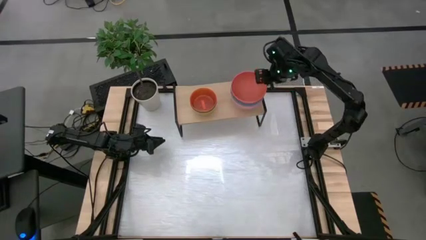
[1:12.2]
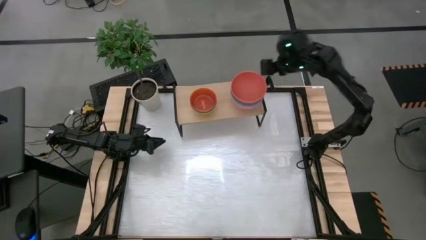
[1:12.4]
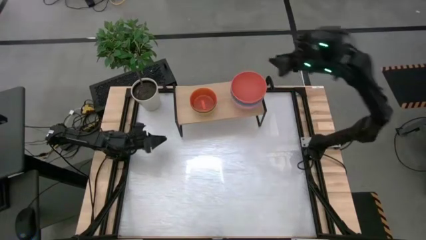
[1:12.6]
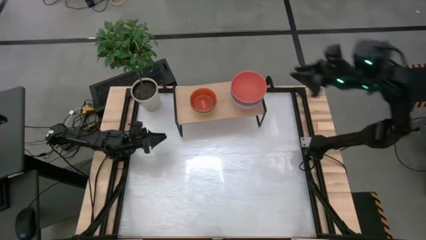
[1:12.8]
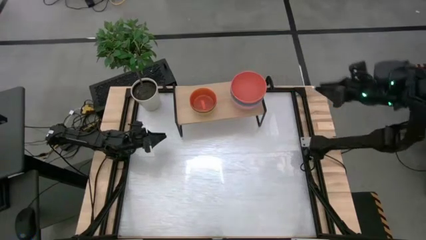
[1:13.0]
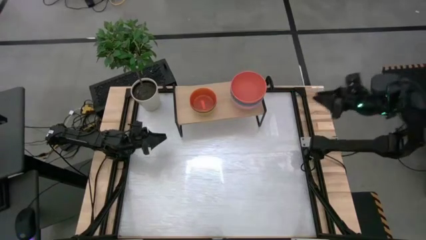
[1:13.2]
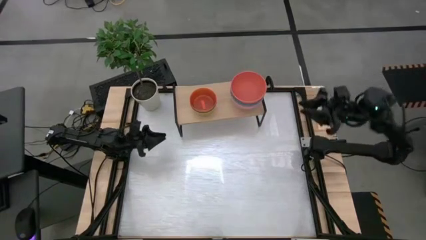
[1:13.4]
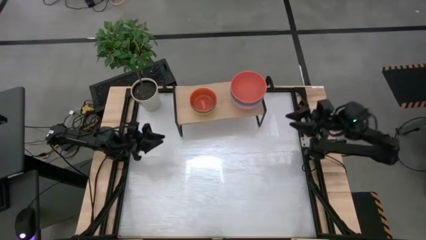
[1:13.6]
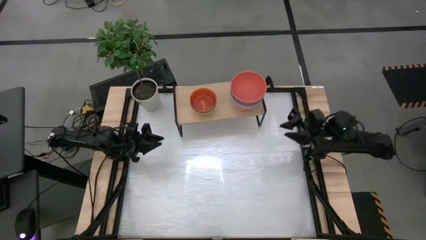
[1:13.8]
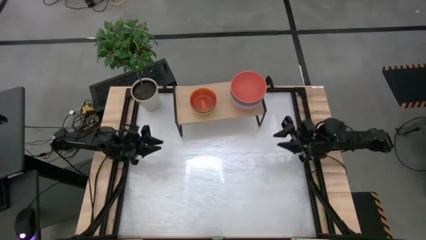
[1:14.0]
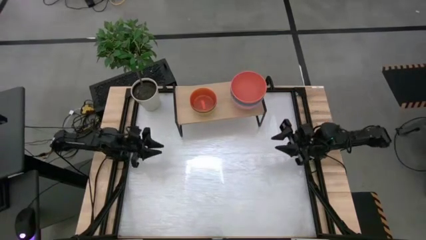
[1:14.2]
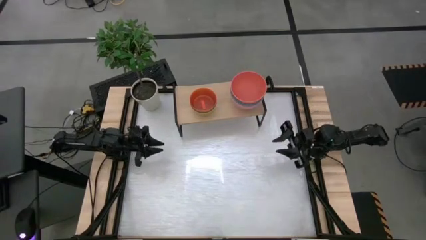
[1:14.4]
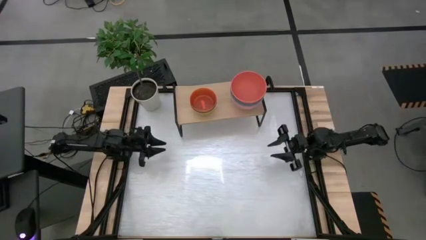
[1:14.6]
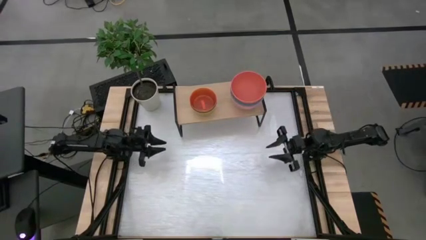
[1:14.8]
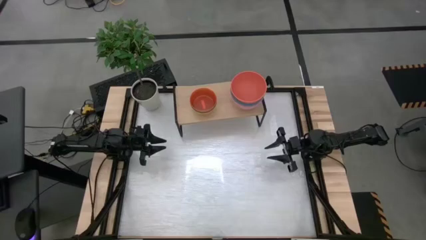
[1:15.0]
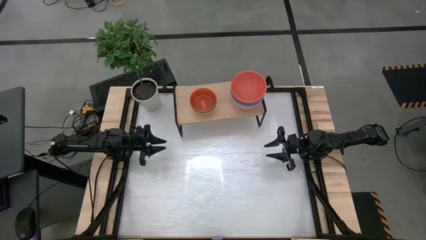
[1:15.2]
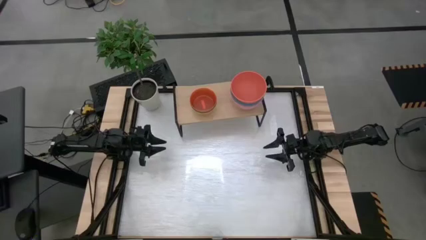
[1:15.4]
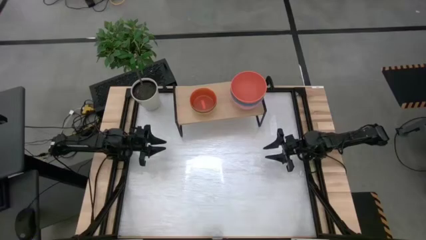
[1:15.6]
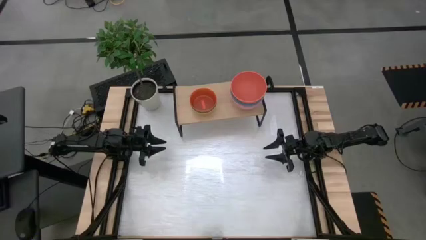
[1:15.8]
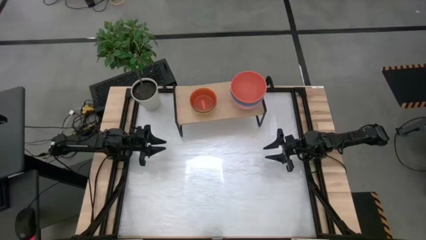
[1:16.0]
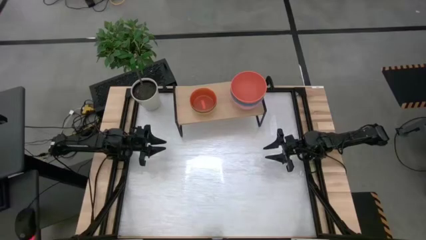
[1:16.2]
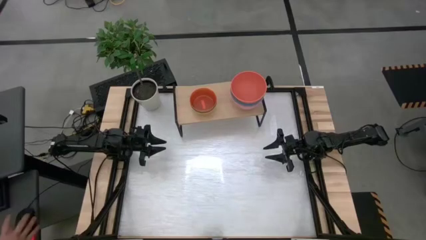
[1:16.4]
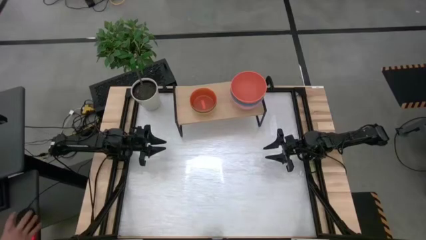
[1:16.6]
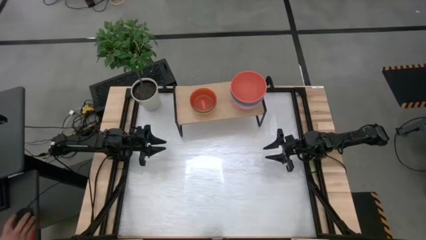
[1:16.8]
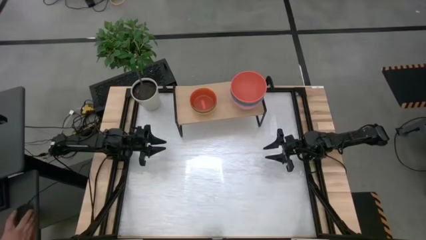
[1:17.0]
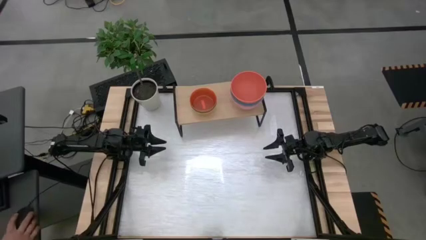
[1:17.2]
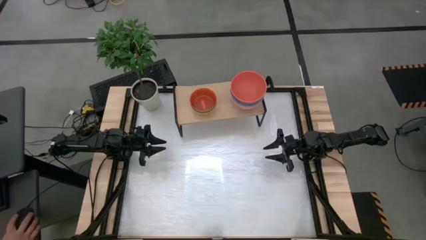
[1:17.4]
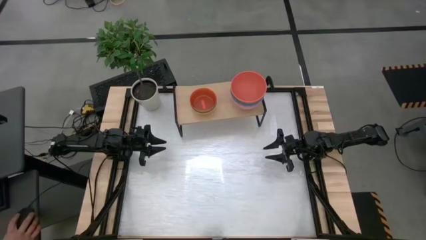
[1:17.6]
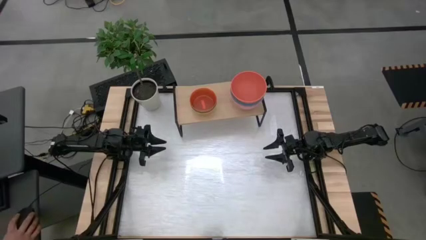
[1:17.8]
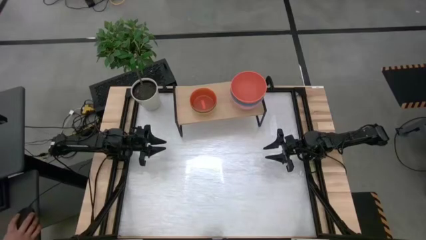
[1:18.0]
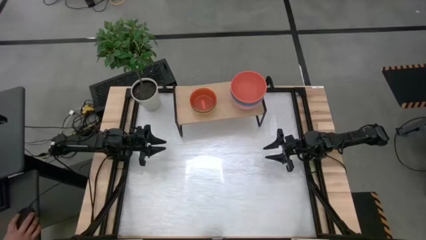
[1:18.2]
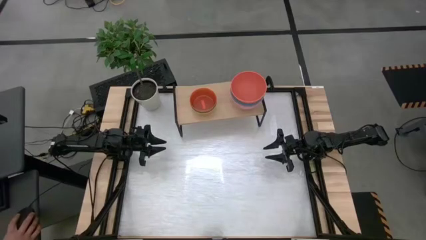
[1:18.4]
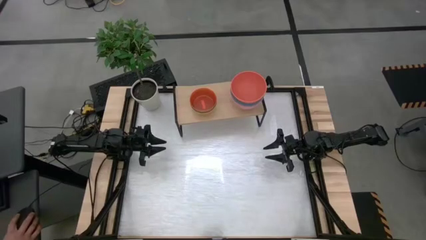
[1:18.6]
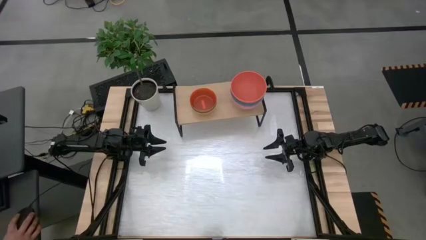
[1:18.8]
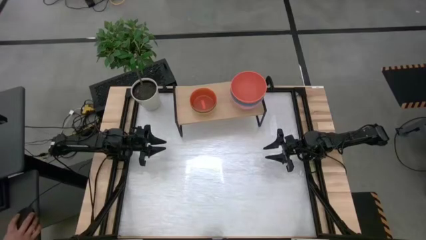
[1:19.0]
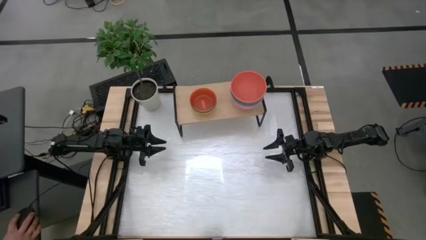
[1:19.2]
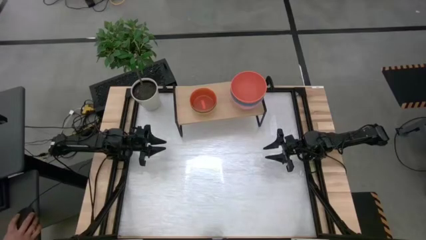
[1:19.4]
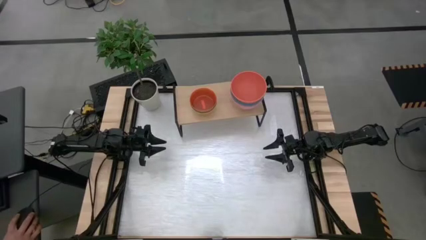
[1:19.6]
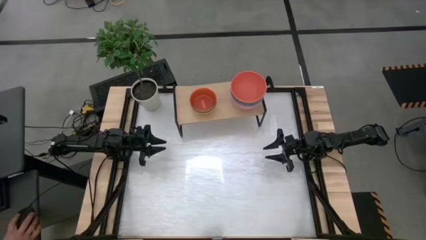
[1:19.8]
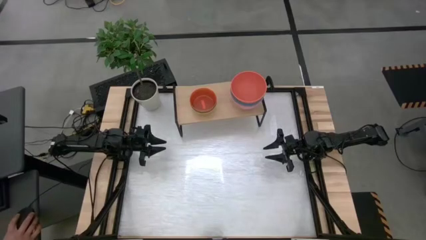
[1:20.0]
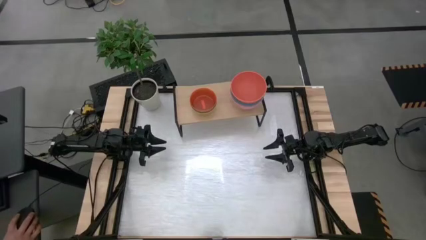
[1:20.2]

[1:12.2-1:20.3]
Task: Place and stack bowls onto a shelf
Return to Home Position

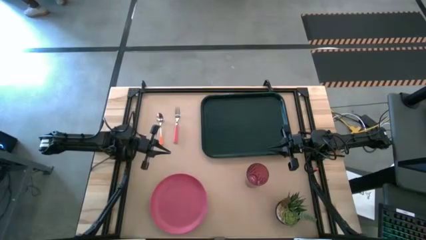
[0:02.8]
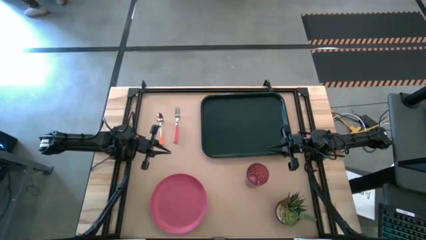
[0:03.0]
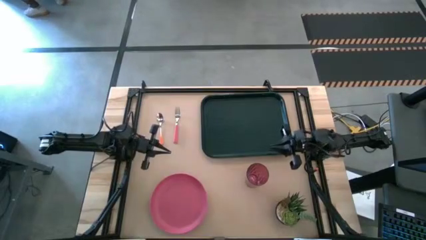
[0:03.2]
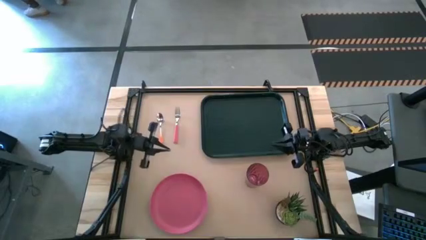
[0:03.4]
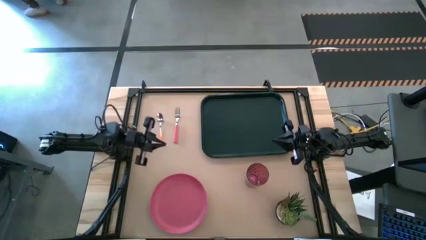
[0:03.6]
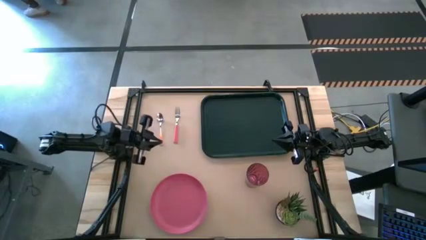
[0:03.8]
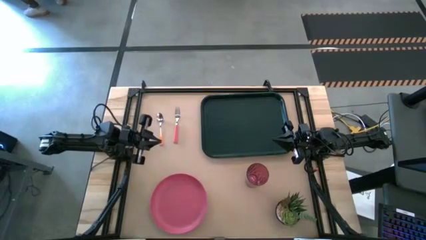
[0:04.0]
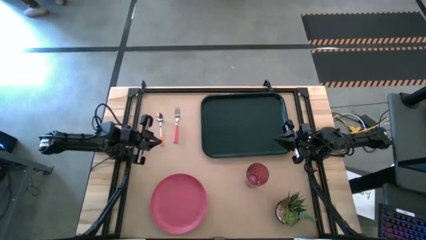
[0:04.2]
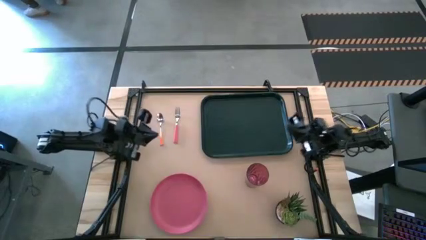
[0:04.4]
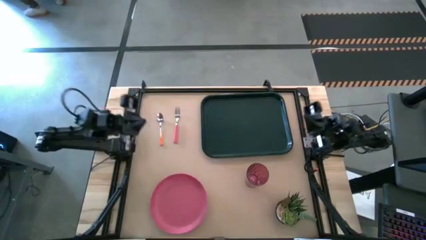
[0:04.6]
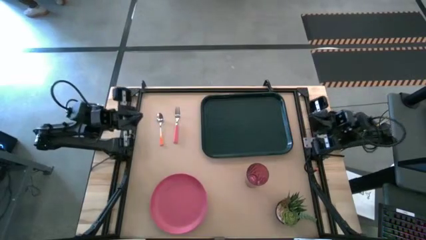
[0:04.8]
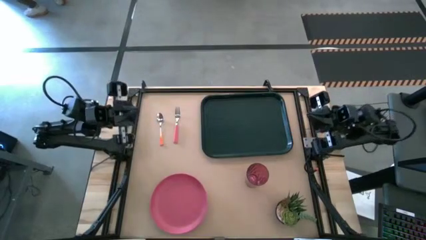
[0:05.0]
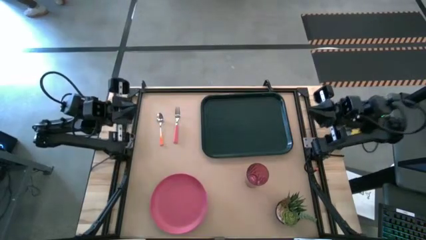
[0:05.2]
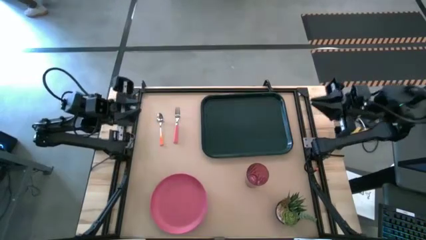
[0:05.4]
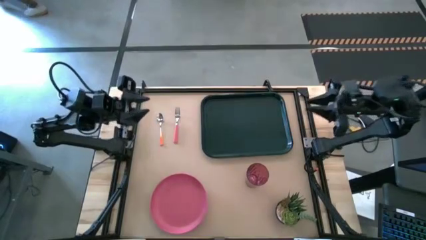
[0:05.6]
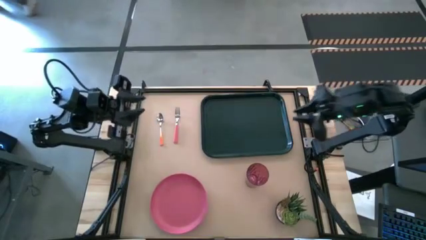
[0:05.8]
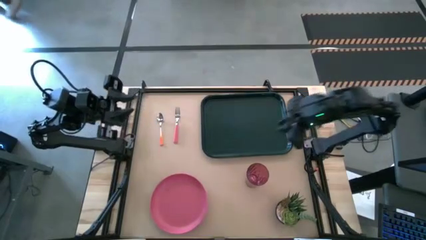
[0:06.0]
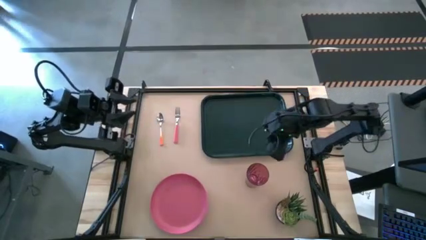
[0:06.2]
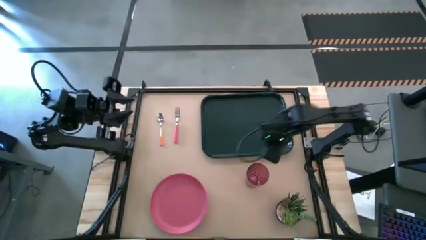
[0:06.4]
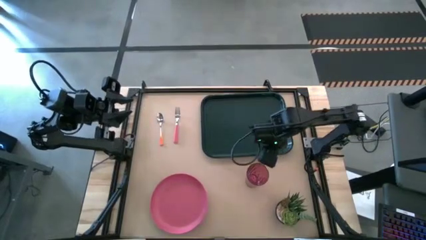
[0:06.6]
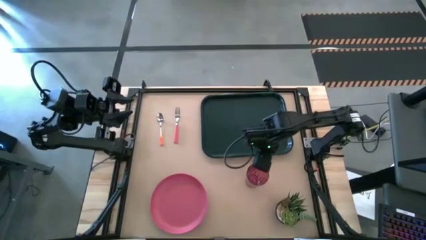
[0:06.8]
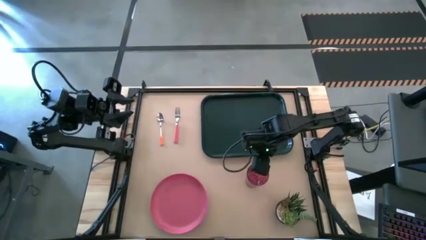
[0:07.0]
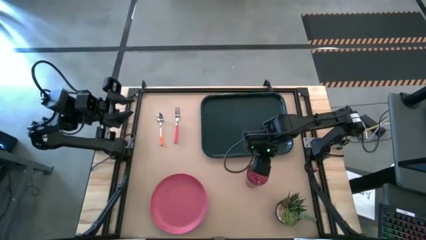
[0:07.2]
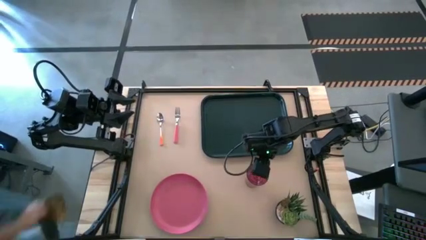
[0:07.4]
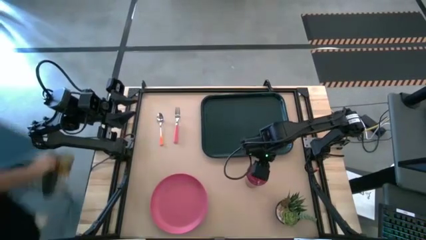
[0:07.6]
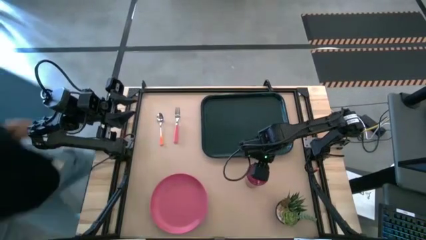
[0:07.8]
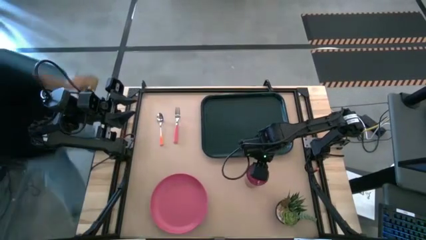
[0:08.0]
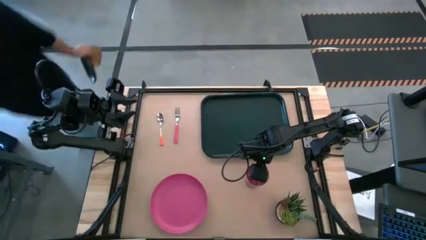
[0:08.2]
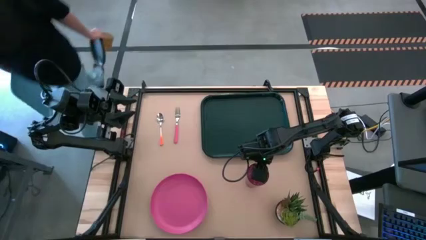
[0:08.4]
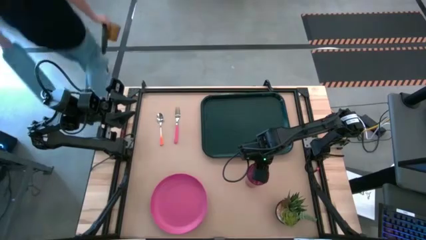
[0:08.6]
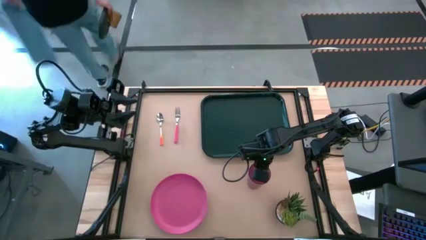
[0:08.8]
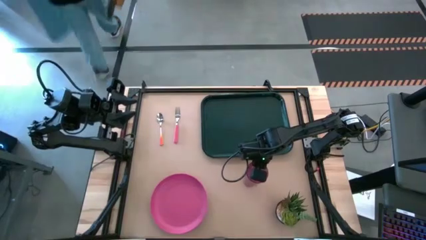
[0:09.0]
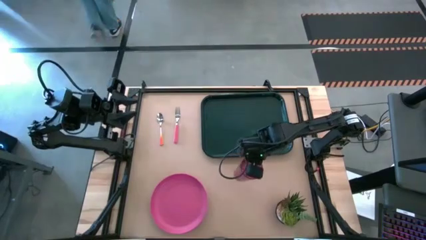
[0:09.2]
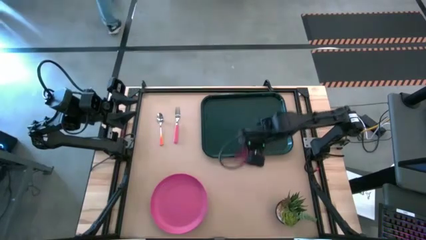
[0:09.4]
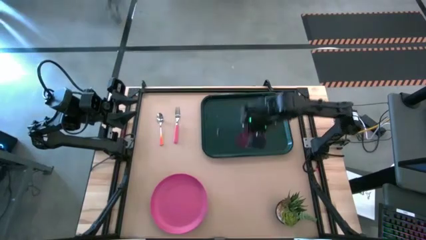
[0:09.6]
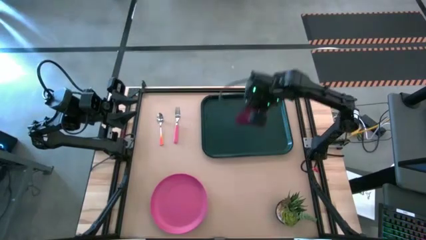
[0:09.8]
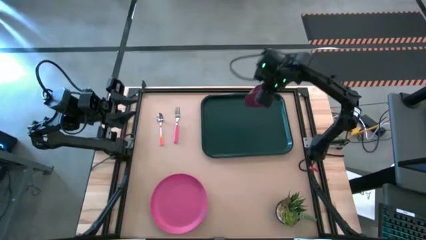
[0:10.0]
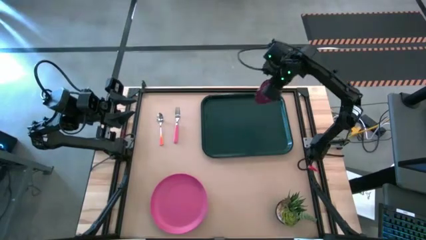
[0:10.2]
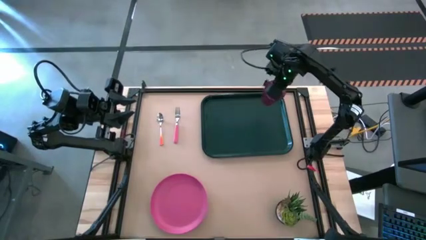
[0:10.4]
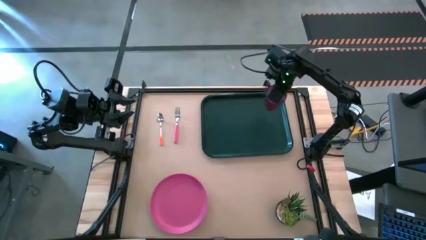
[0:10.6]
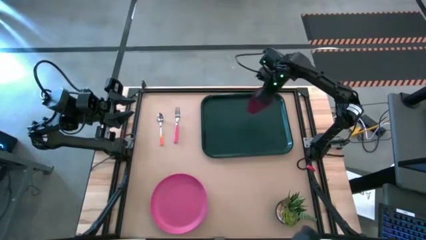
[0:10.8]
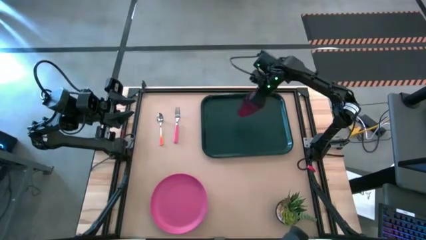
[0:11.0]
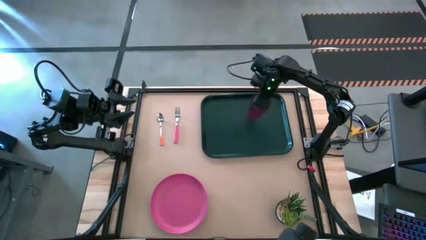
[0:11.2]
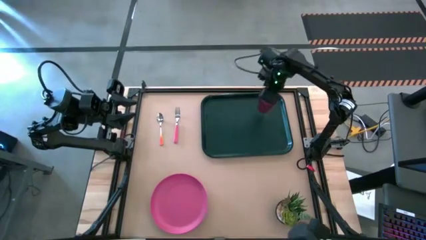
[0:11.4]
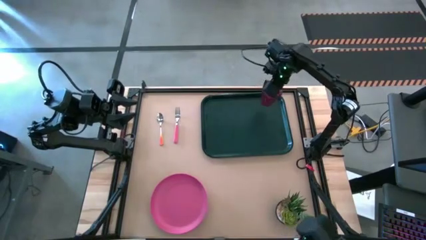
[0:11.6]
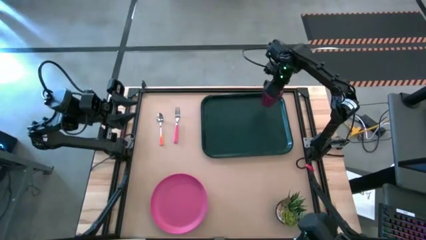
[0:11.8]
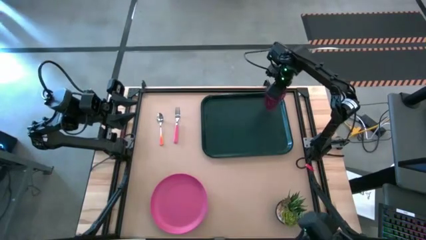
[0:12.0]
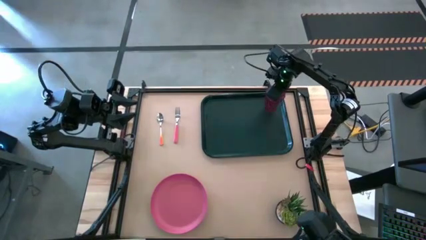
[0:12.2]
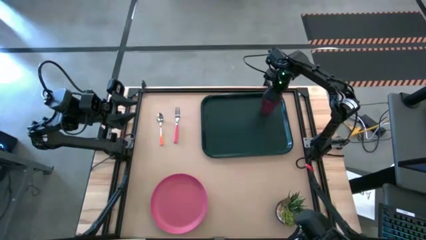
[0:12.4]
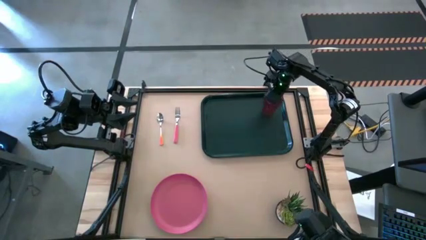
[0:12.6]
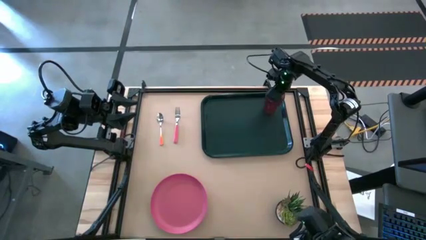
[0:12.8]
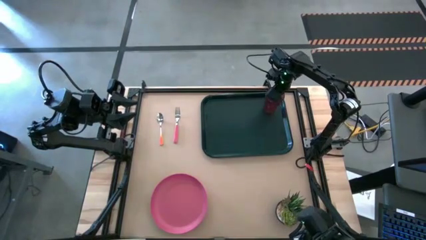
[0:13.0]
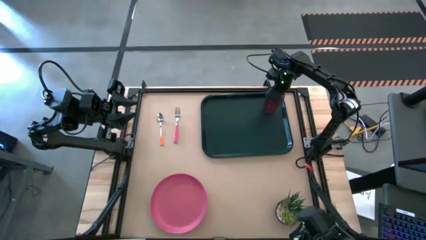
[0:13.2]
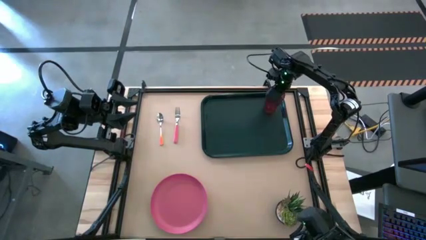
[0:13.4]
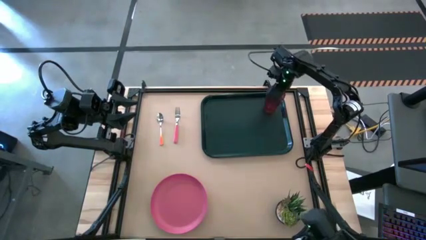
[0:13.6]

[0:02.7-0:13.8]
Task: Pick and place plate/cup/fork/spoon on tray
Put the red glass on the top right of the black serving tray
